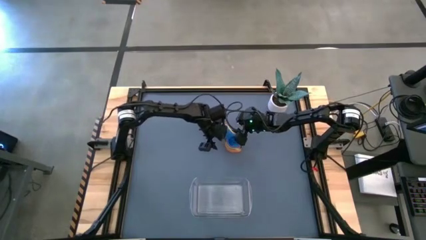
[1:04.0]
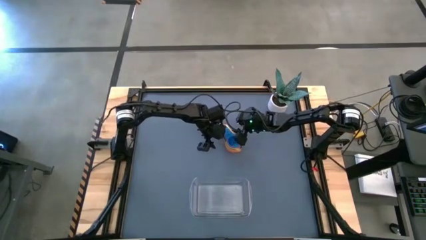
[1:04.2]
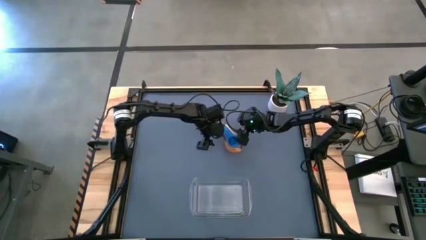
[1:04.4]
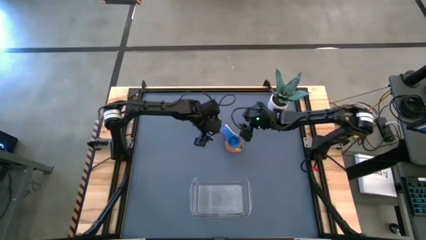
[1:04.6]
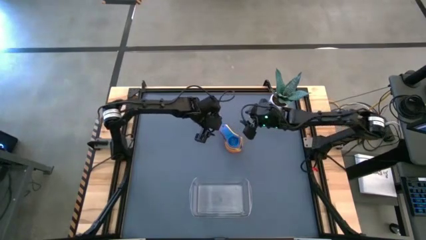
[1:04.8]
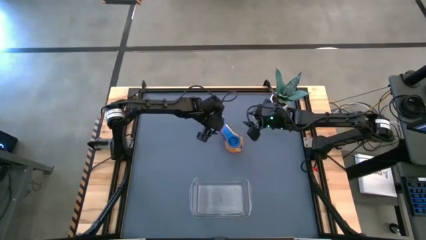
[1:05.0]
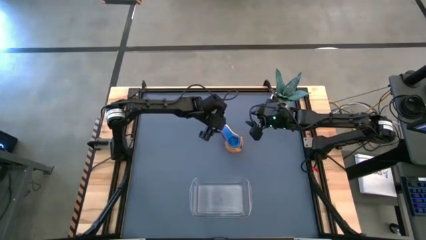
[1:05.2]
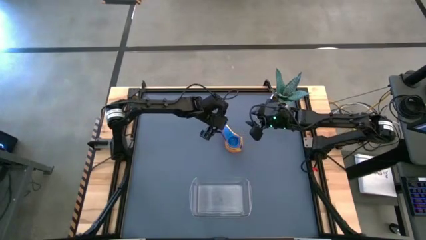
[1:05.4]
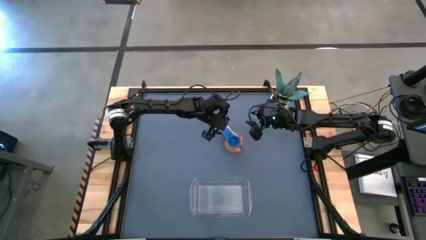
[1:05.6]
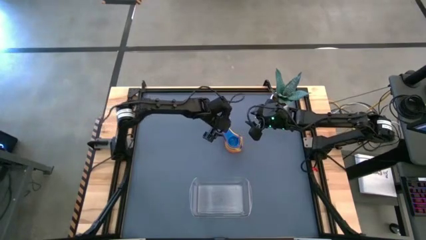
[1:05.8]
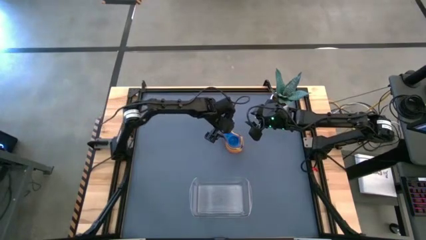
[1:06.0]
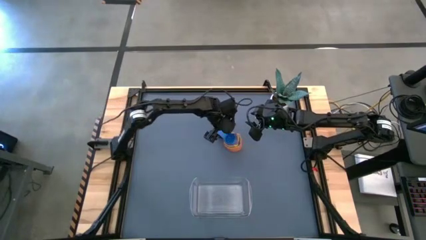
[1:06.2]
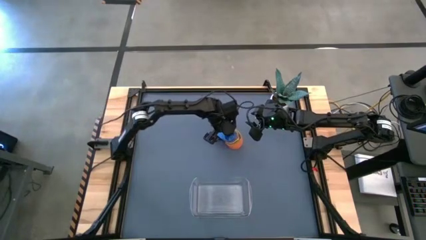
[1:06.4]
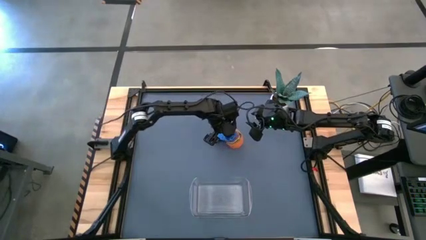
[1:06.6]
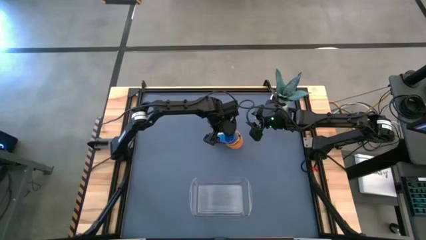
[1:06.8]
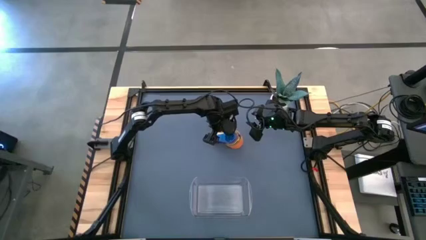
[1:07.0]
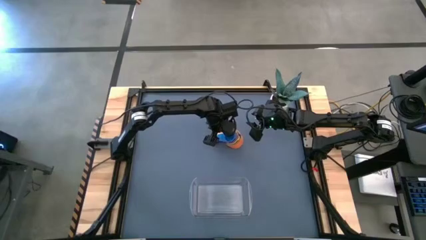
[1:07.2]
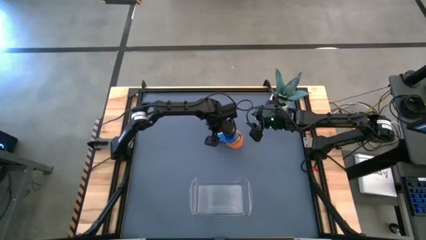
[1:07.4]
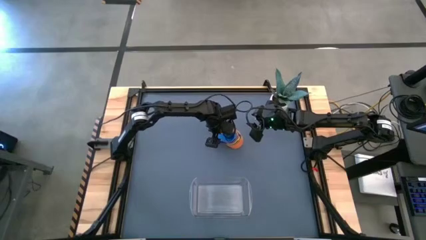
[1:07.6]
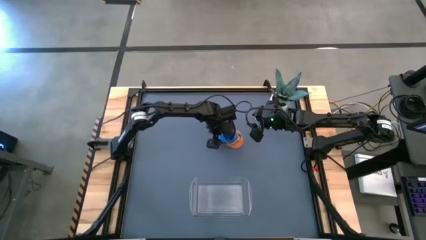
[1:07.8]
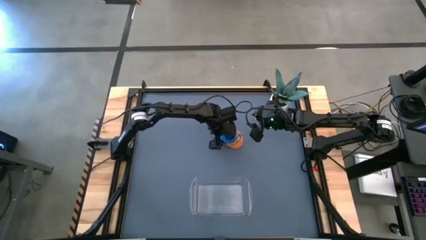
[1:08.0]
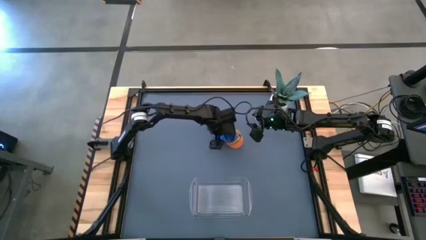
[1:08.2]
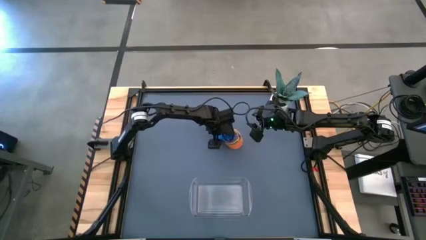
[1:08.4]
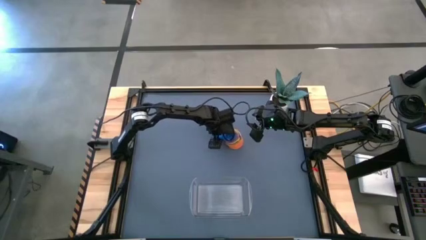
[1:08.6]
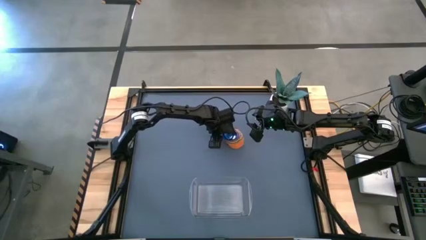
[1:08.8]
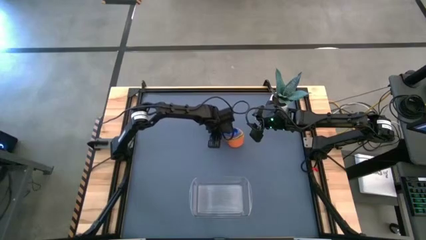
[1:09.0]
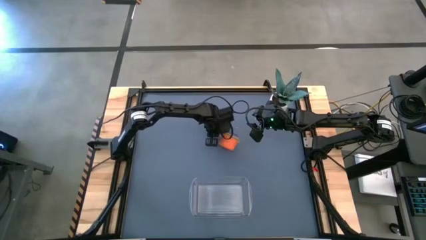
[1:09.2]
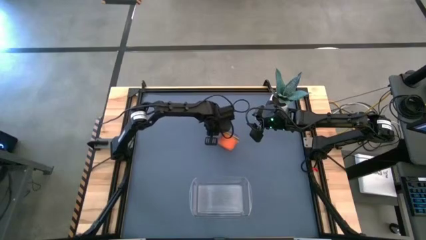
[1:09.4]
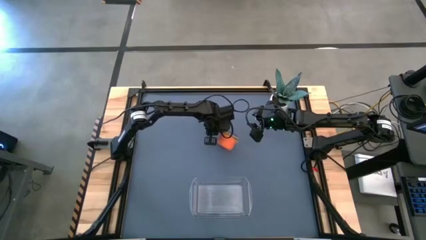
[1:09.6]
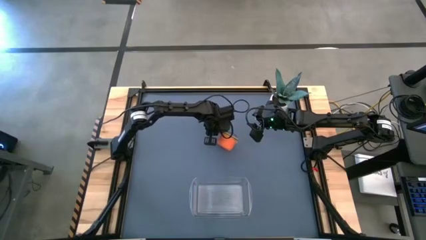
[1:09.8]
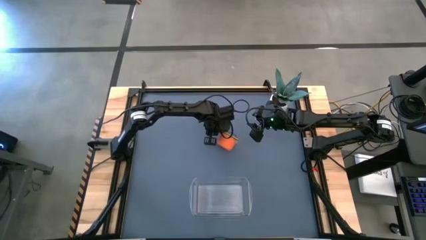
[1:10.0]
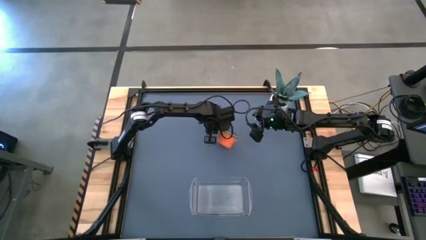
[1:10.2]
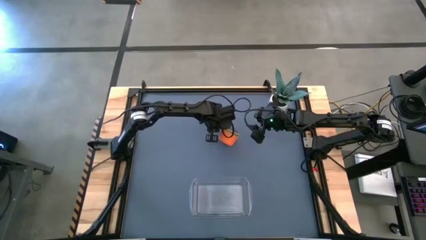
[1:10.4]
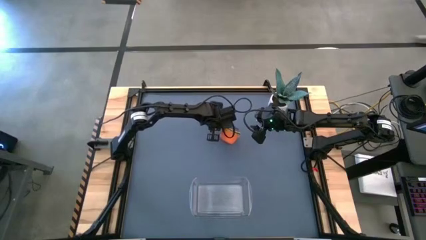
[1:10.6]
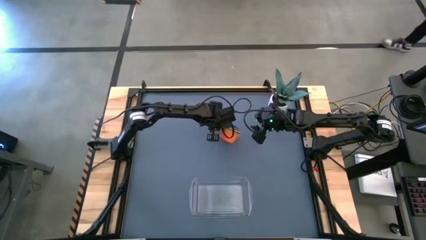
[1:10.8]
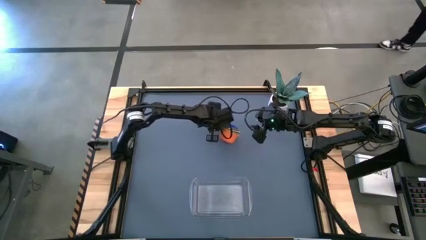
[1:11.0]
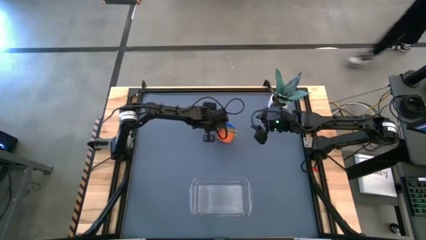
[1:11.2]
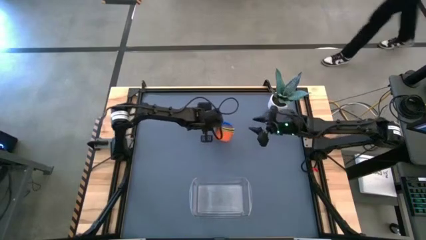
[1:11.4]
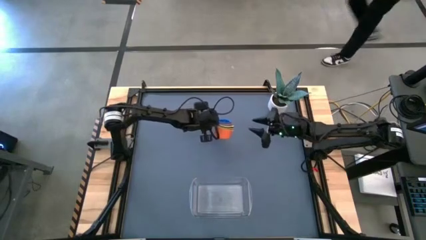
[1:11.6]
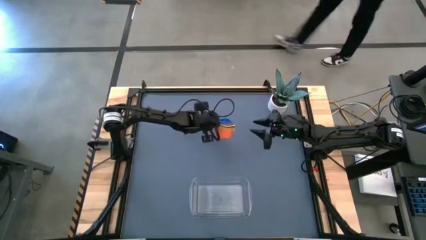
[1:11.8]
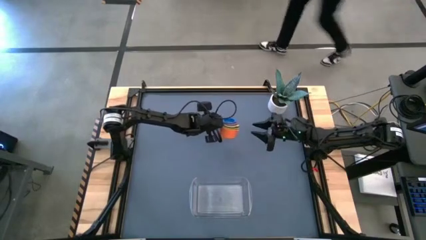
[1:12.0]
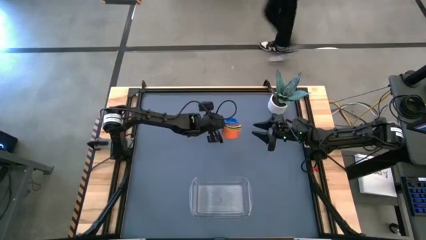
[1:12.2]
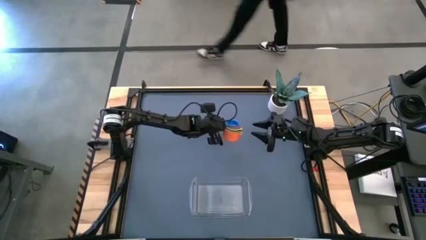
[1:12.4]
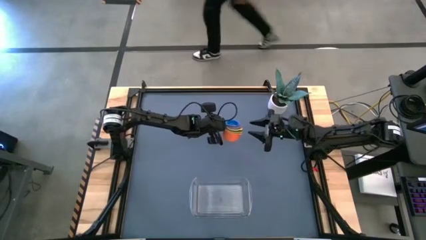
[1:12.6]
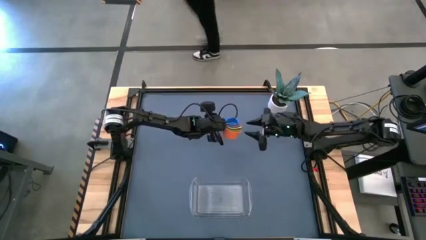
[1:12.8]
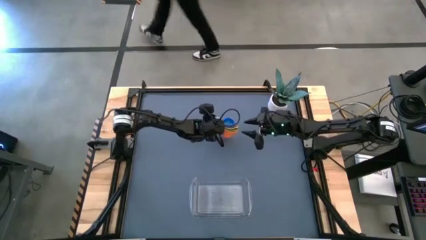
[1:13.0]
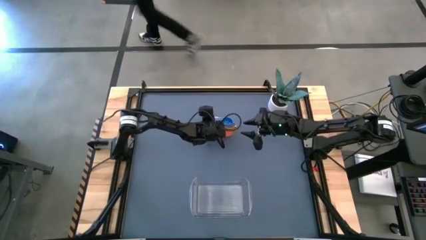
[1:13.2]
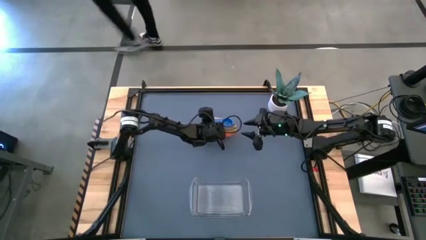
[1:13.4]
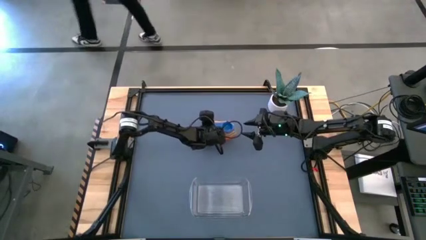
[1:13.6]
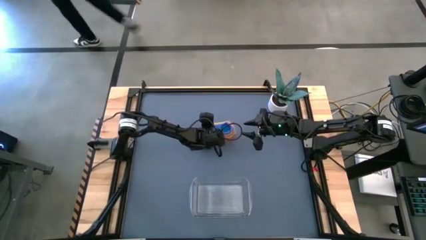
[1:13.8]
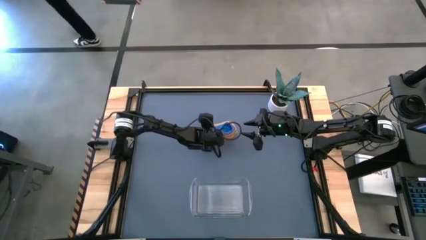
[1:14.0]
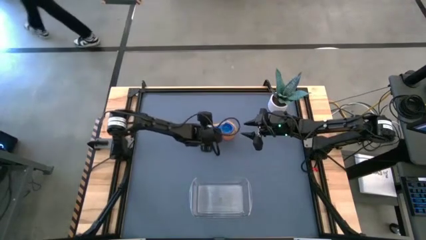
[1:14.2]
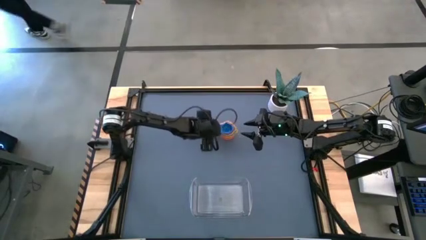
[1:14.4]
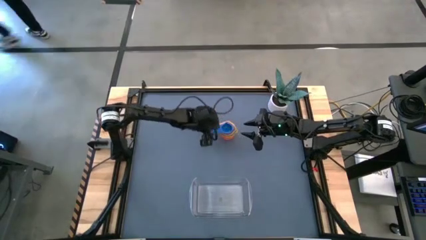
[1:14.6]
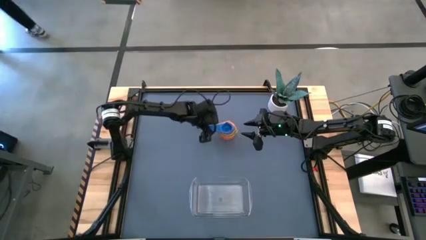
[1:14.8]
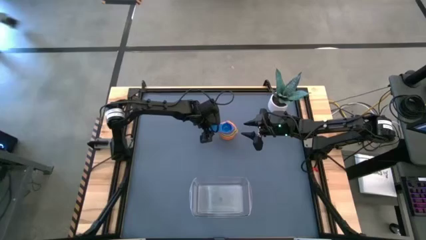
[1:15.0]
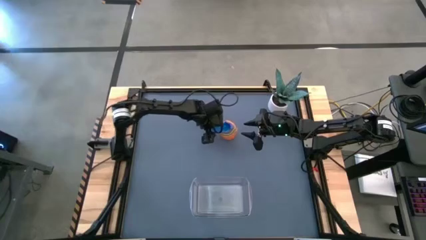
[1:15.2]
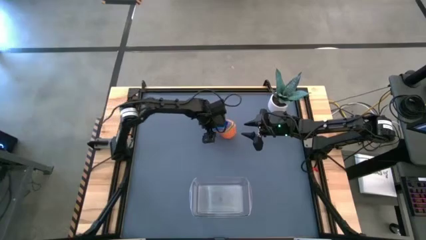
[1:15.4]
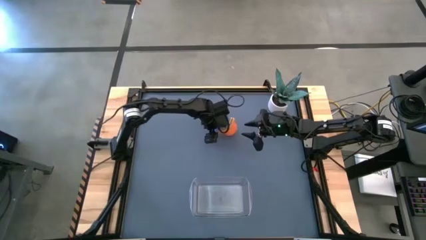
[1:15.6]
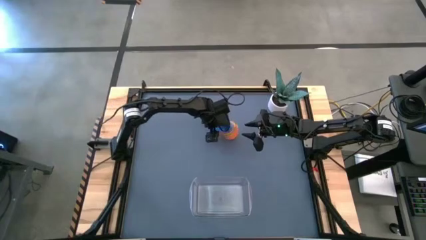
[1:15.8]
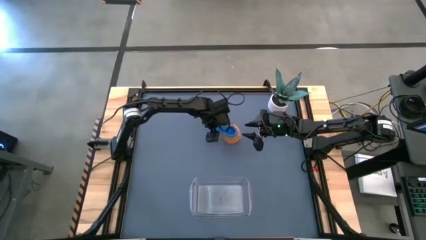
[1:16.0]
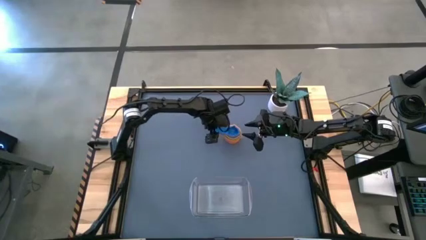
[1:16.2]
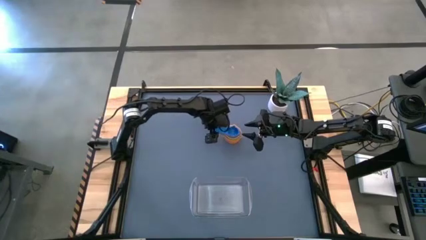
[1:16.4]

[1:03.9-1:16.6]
Task: Nest measuring cups in basket
Put the stacked measuring cups into the transparent bin
